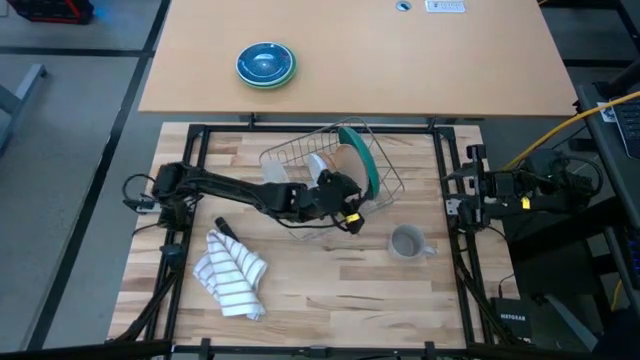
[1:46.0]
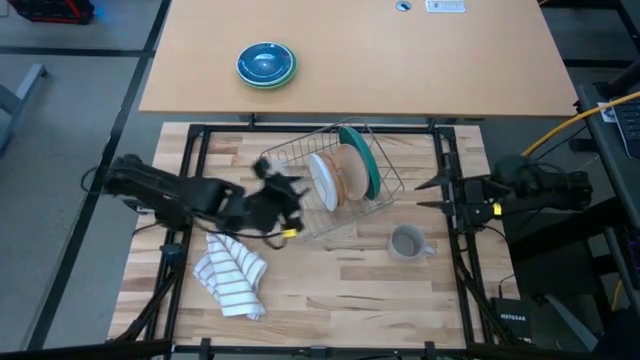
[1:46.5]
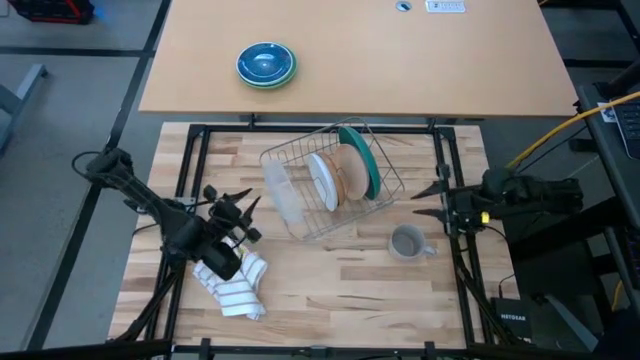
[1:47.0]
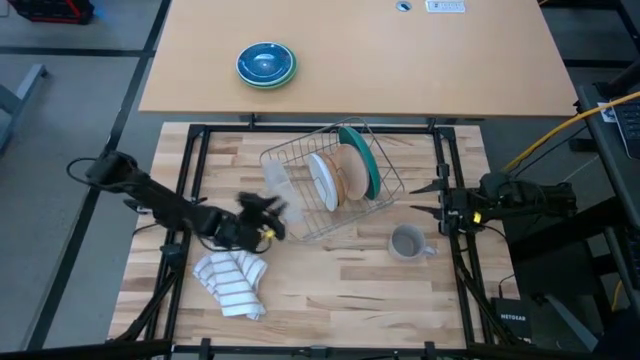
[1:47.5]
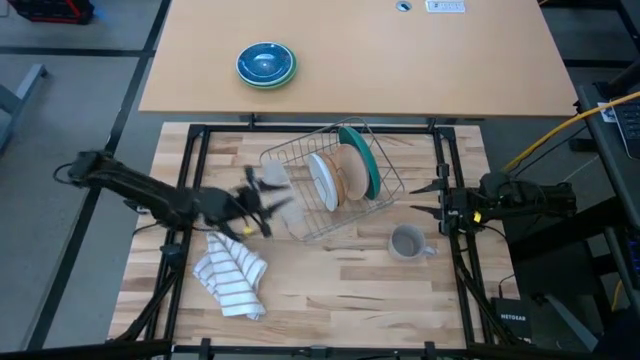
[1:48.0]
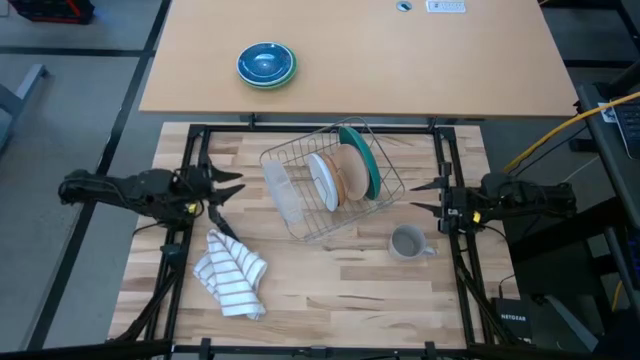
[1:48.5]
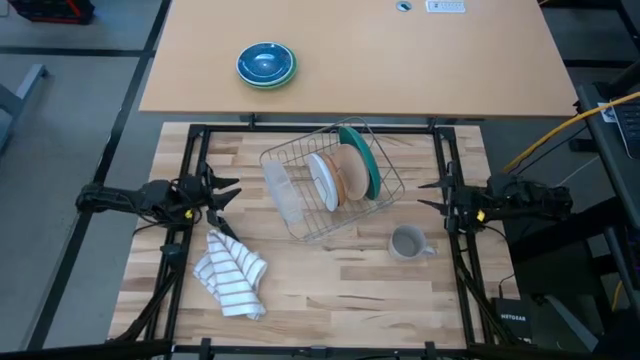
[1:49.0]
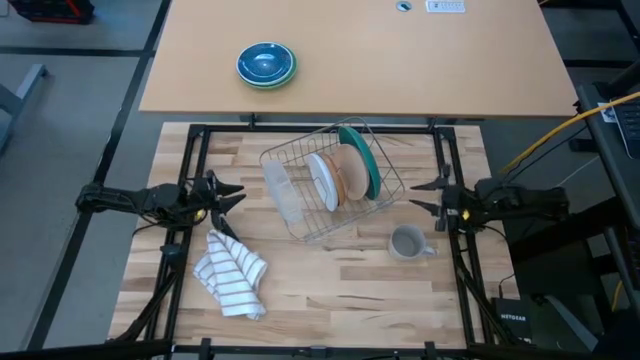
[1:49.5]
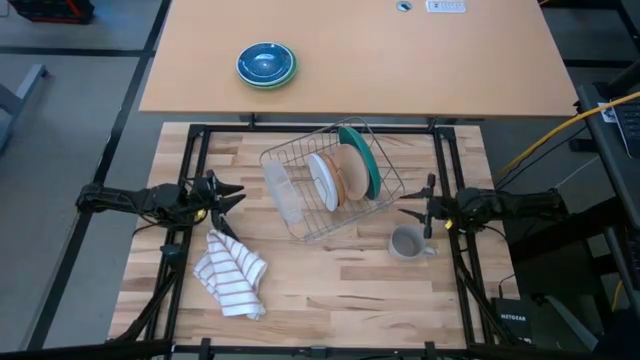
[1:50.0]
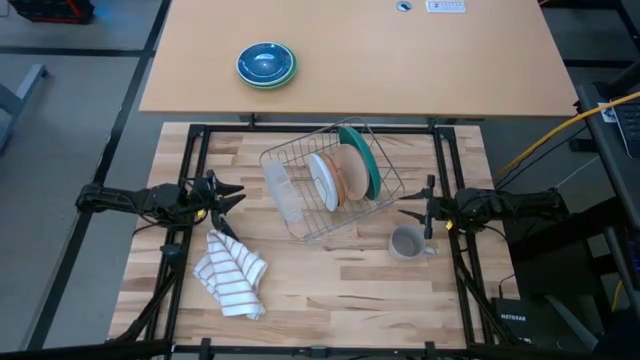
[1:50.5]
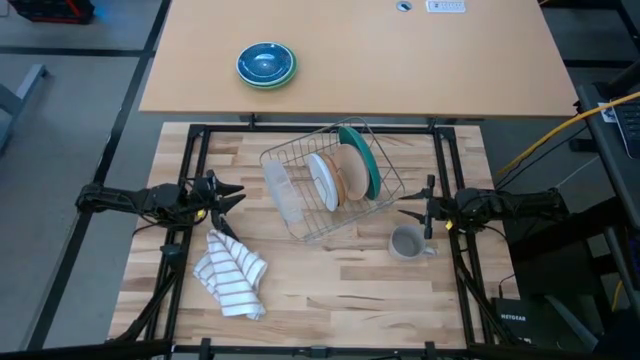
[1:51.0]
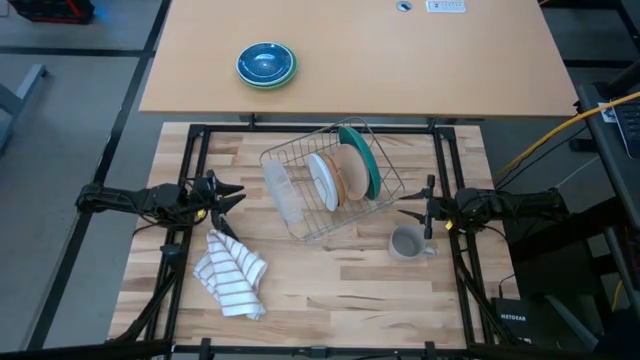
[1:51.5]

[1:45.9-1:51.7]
Task: Sort dishes
Return to Home Position

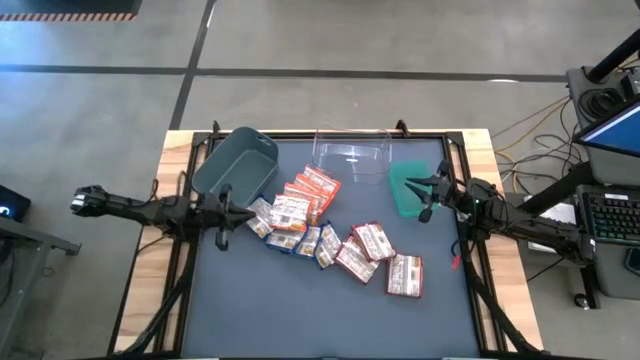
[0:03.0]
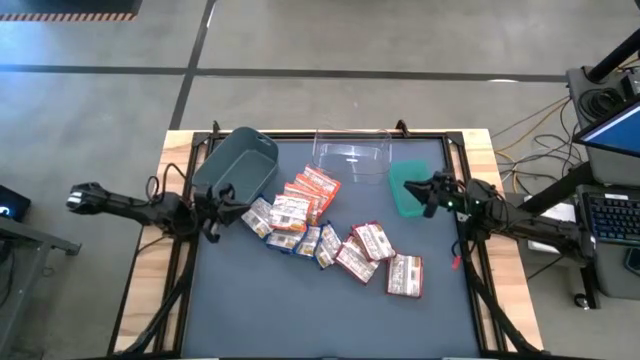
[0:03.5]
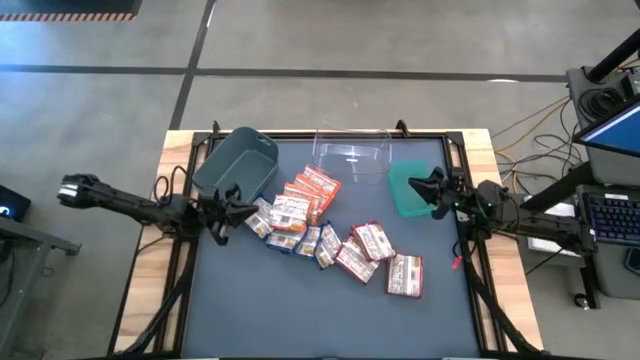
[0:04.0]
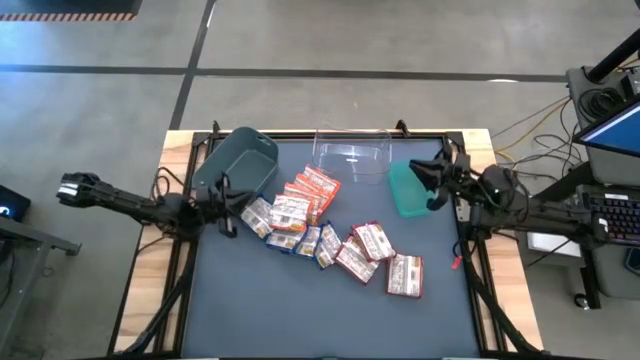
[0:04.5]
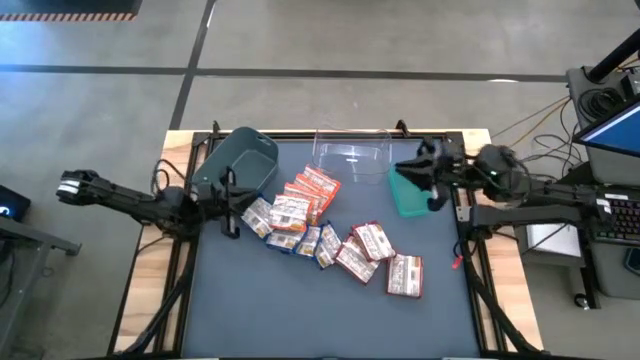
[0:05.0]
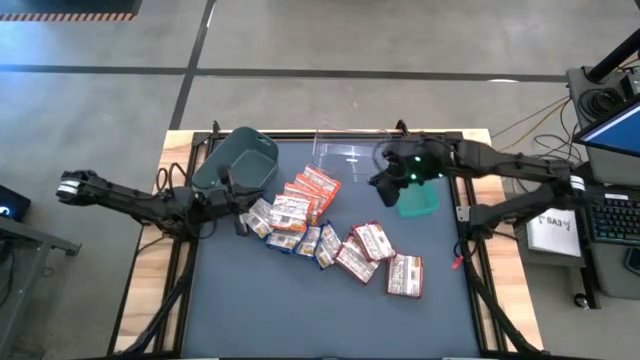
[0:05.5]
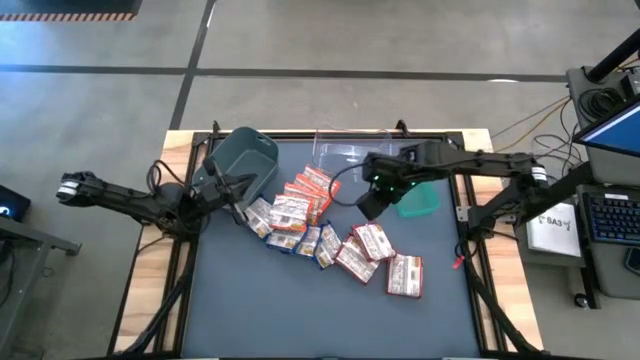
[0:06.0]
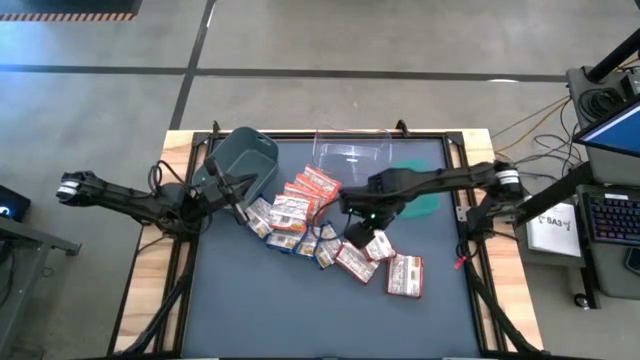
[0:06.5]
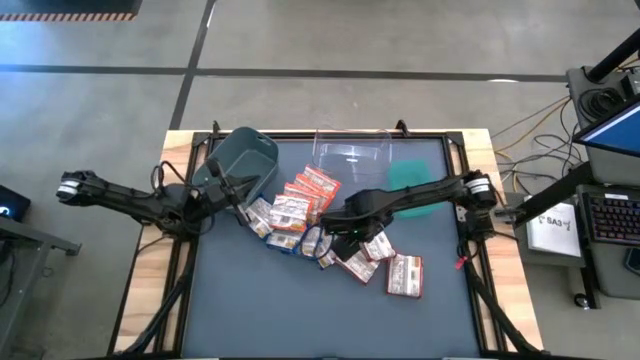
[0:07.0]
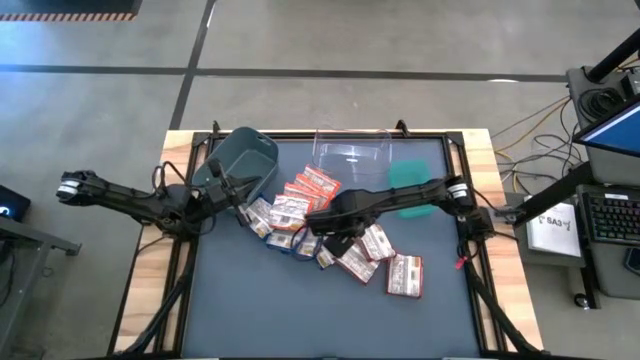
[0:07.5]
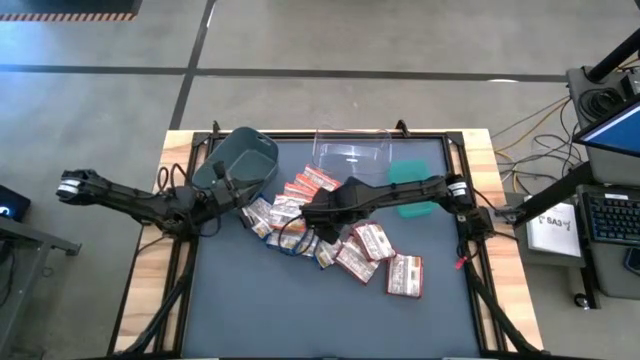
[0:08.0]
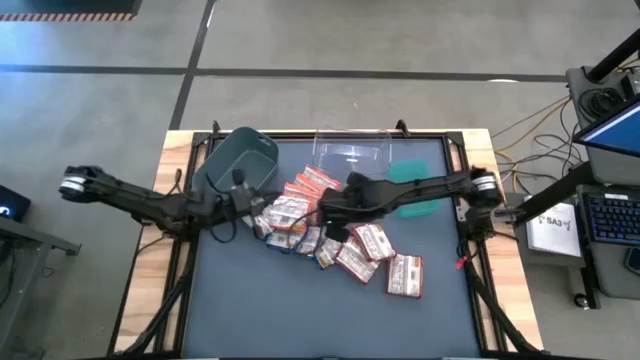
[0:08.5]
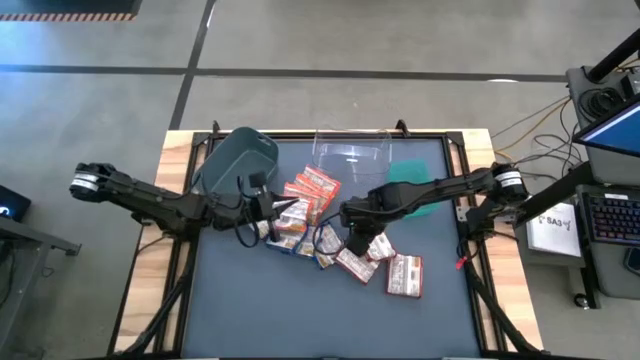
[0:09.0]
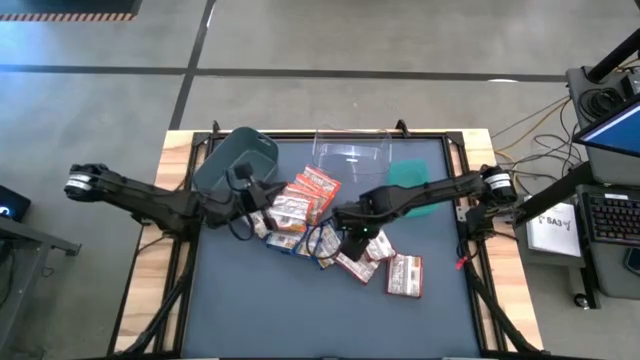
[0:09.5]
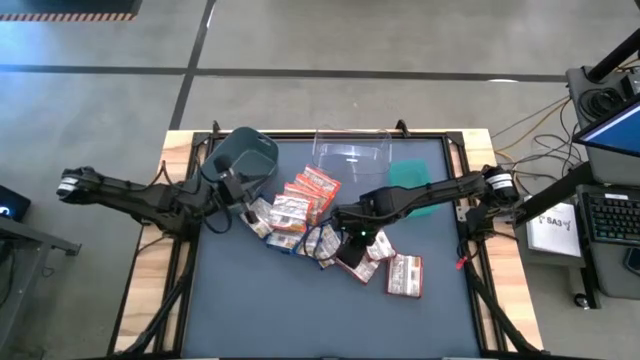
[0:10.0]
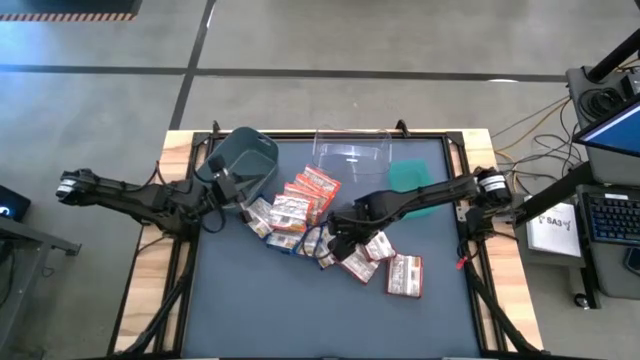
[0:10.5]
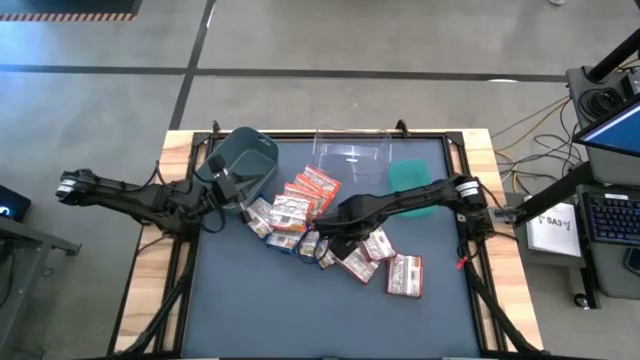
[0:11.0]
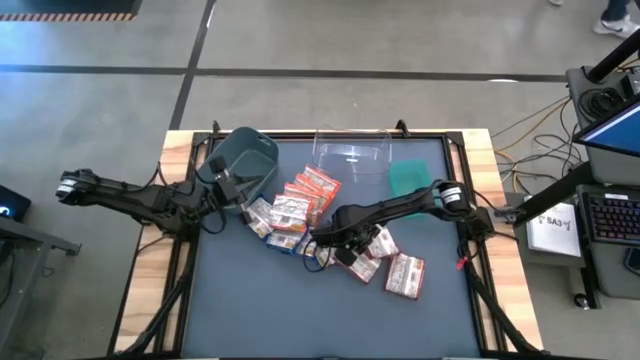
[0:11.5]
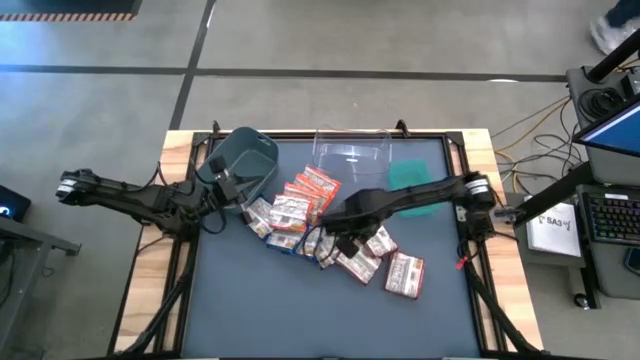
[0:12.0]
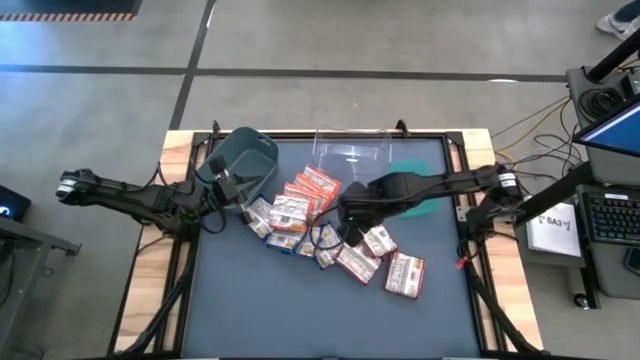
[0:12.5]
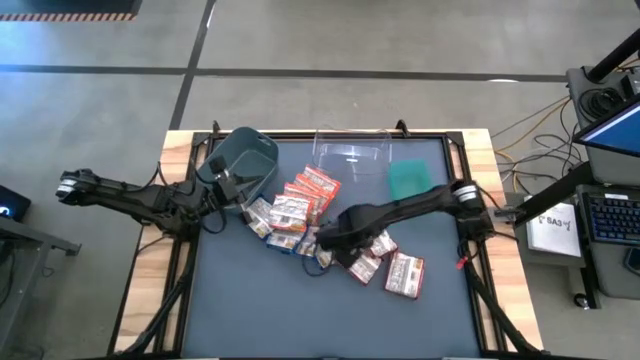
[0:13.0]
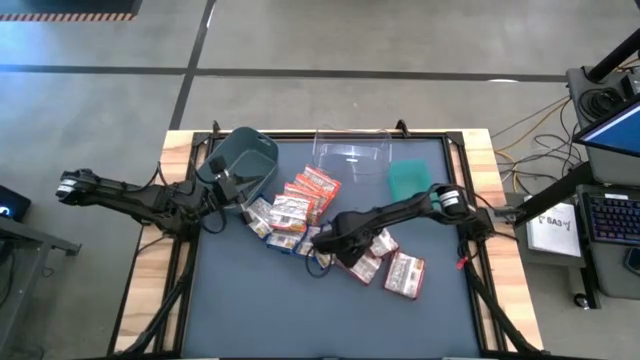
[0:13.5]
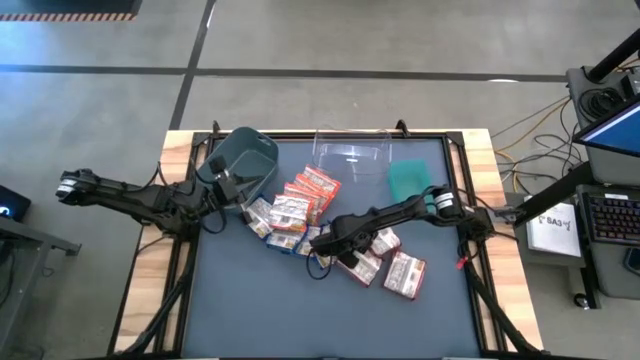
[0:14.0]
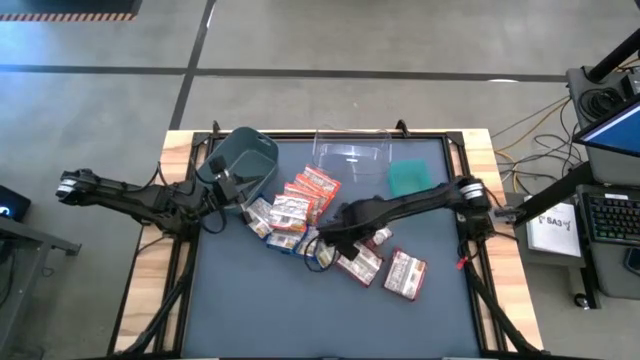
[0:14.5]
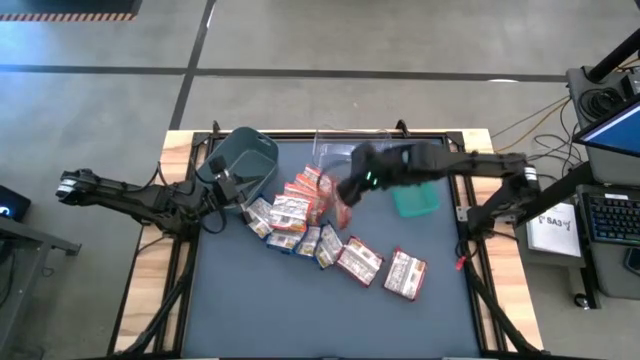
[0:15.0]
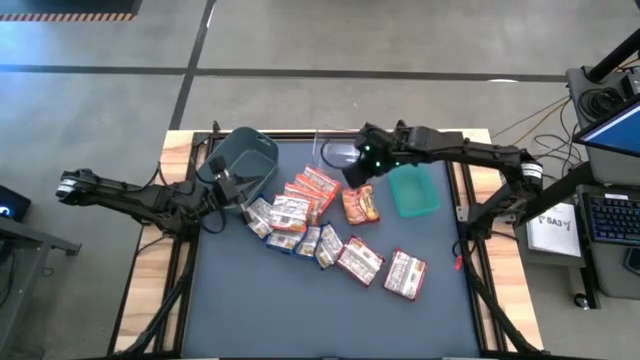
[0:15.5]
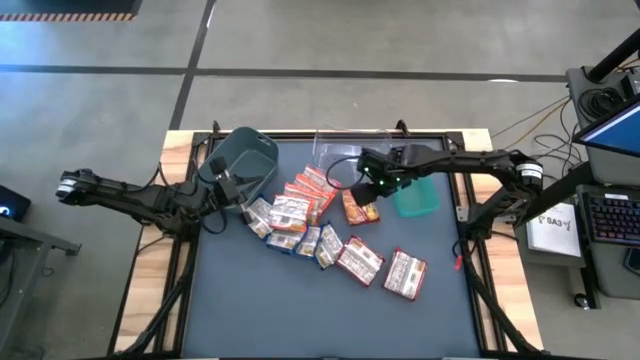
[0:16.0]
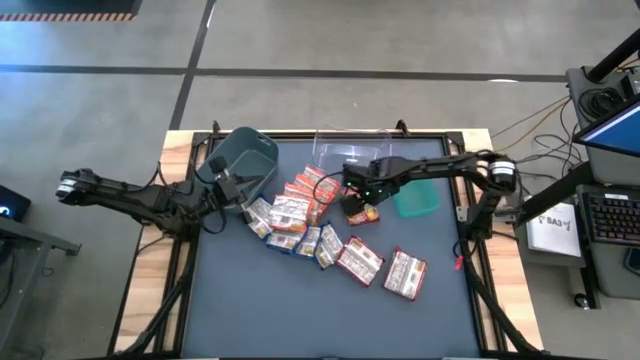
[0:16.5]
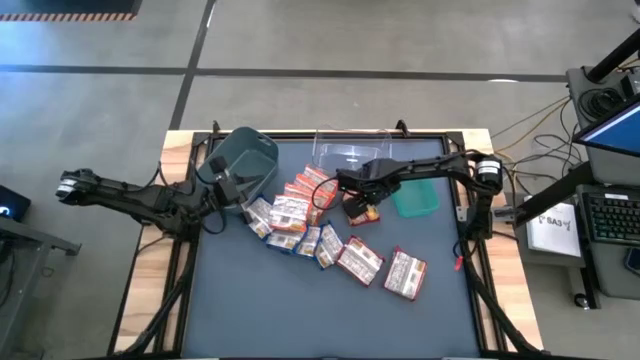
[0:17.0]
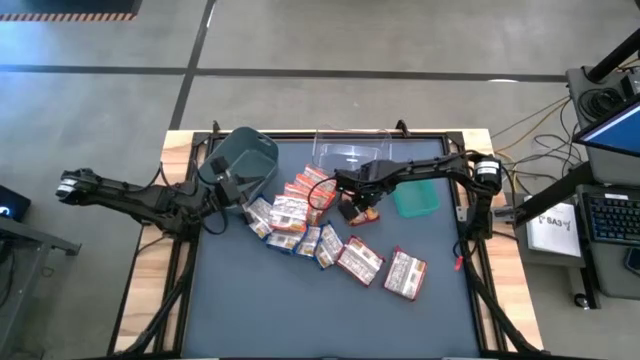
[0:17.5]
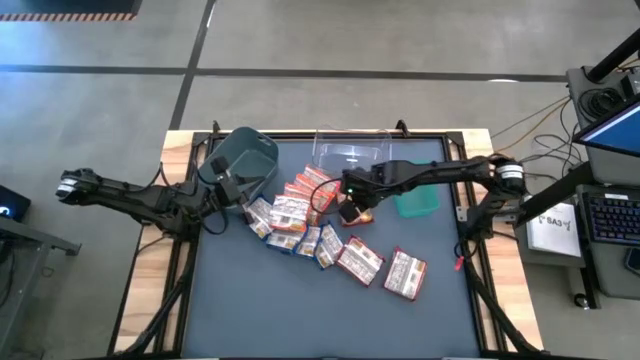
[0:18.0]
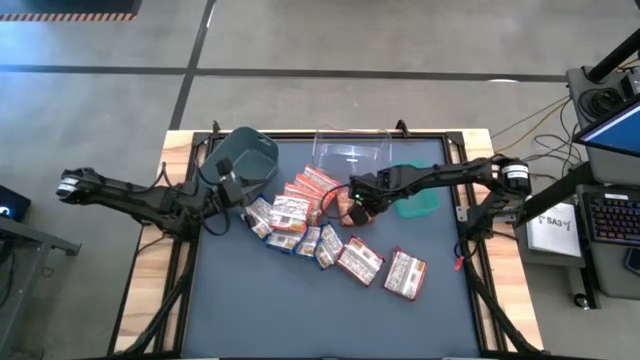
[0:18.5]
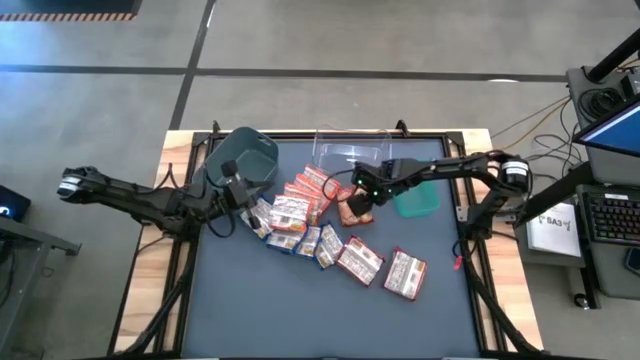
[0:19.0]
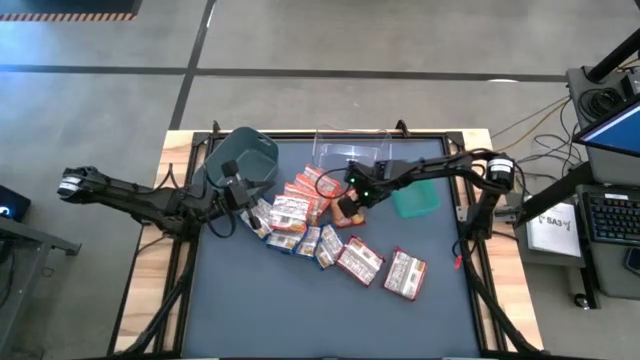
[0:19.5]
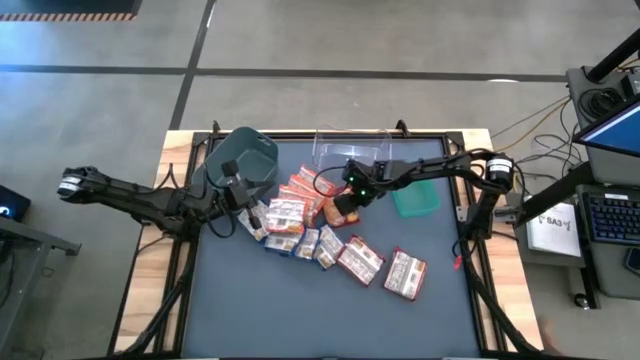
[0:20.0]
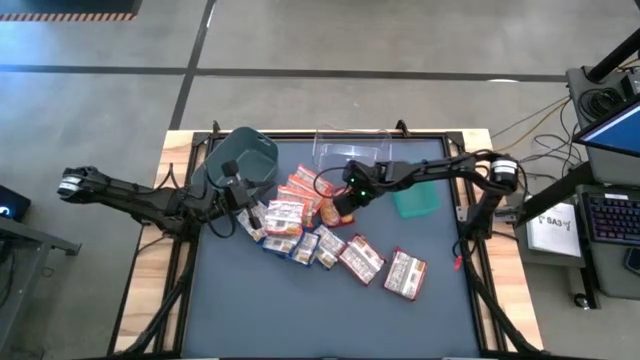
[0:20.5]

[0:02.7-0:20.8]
Task: Sort Maruchan noodles
Put the red noodle pack into the transparent bin
